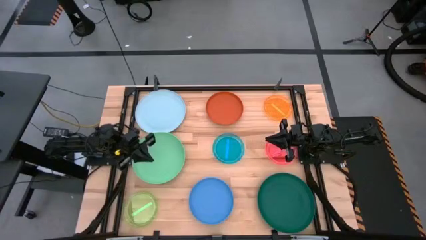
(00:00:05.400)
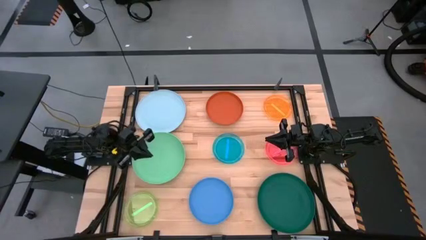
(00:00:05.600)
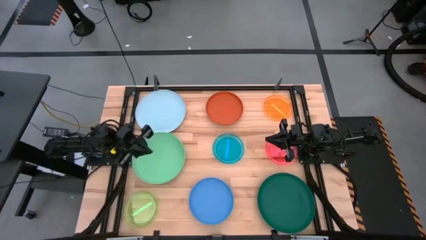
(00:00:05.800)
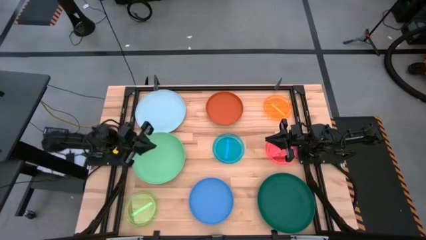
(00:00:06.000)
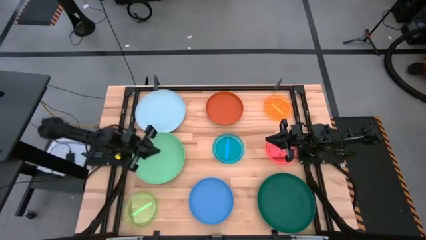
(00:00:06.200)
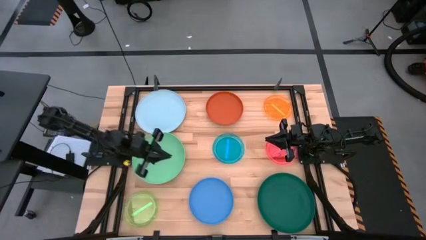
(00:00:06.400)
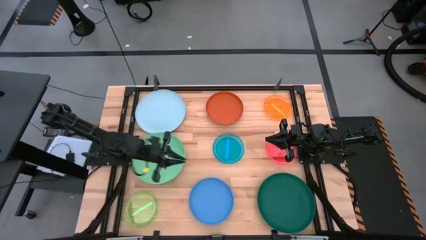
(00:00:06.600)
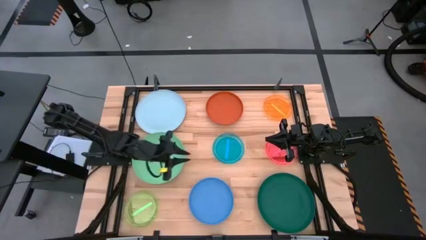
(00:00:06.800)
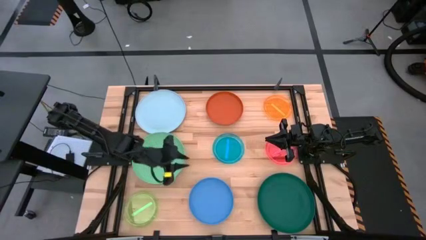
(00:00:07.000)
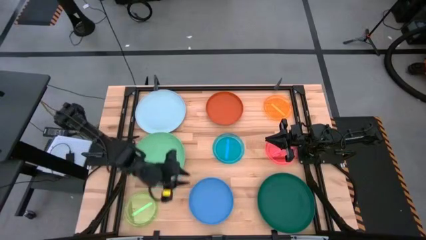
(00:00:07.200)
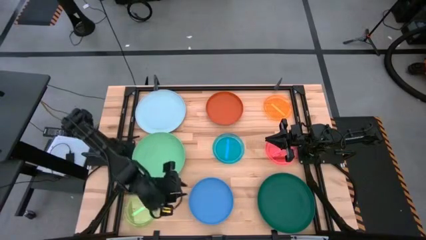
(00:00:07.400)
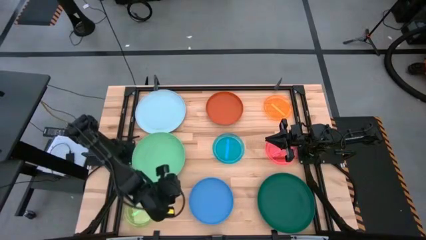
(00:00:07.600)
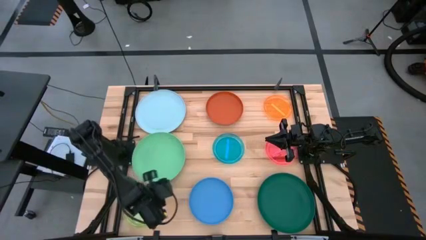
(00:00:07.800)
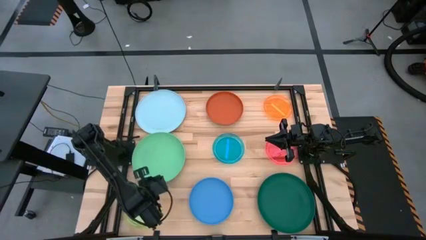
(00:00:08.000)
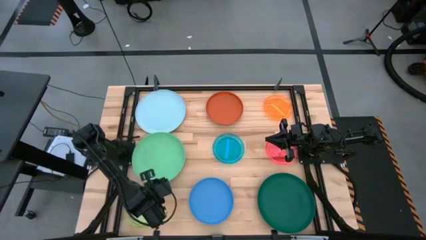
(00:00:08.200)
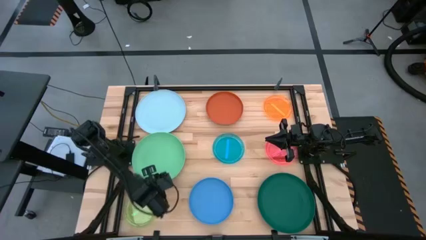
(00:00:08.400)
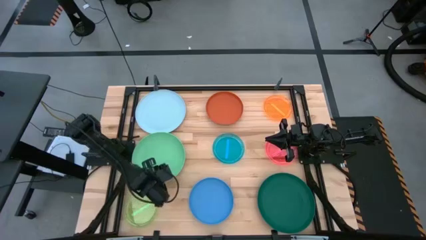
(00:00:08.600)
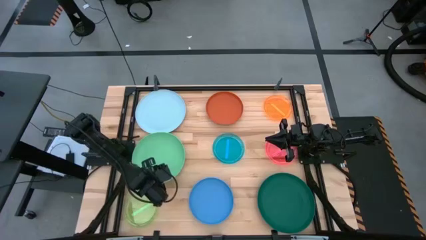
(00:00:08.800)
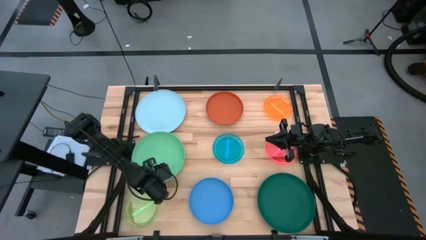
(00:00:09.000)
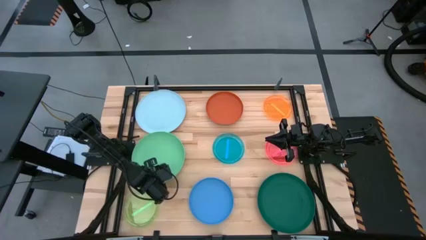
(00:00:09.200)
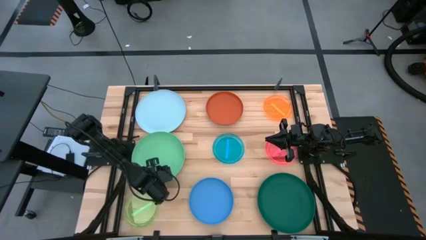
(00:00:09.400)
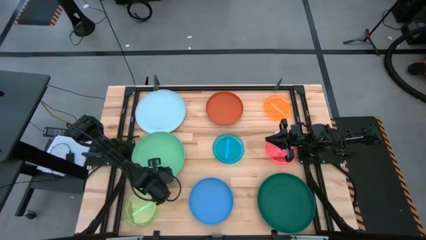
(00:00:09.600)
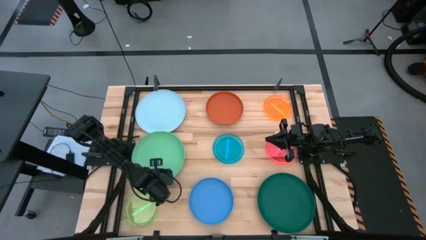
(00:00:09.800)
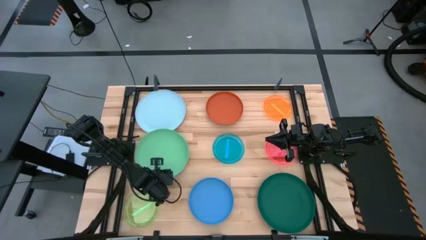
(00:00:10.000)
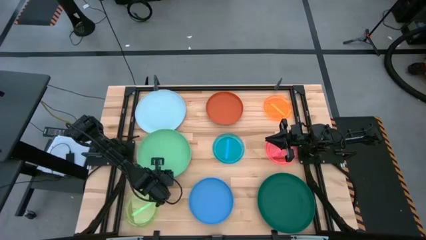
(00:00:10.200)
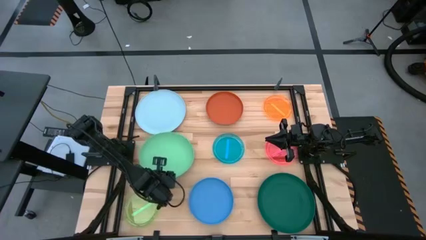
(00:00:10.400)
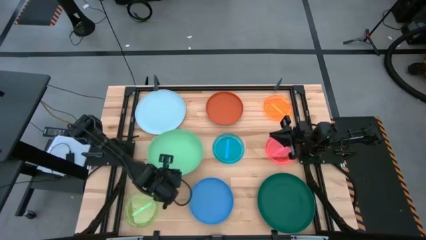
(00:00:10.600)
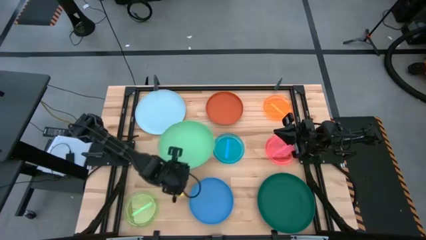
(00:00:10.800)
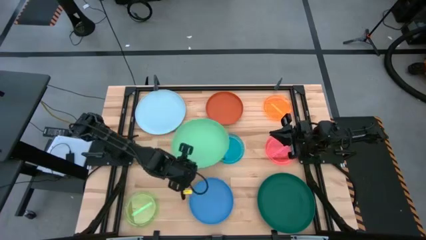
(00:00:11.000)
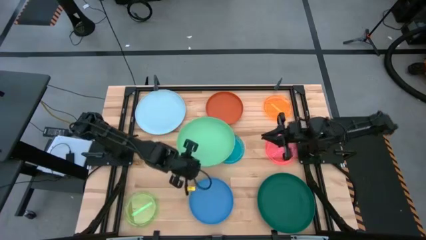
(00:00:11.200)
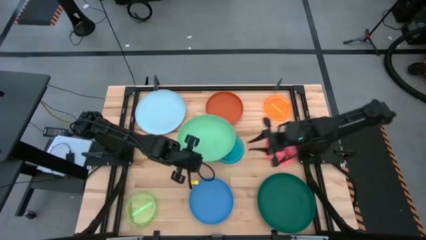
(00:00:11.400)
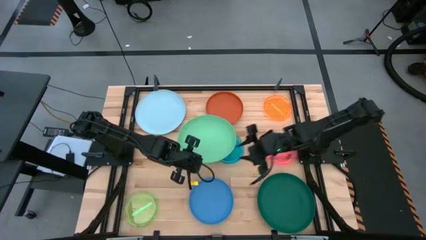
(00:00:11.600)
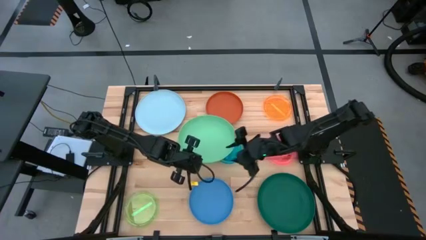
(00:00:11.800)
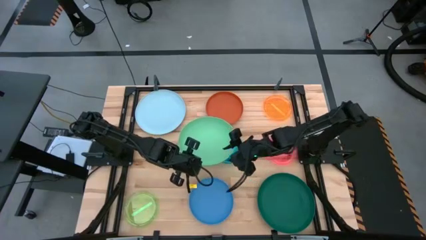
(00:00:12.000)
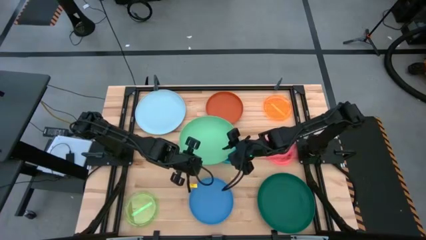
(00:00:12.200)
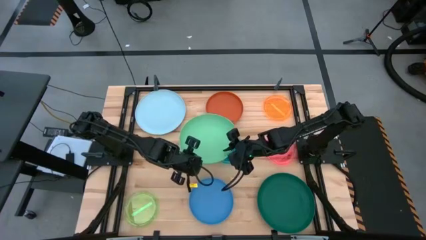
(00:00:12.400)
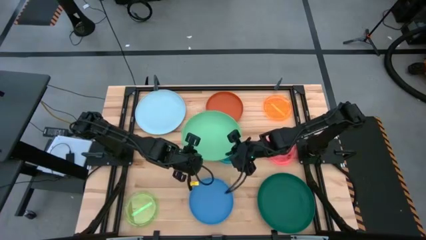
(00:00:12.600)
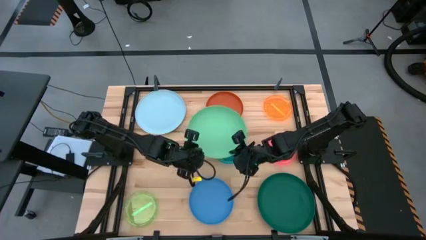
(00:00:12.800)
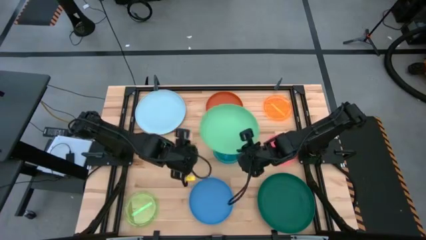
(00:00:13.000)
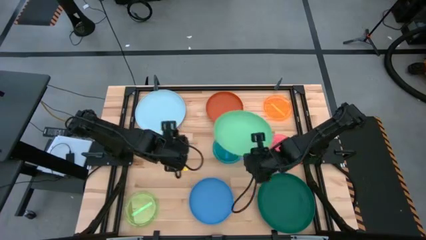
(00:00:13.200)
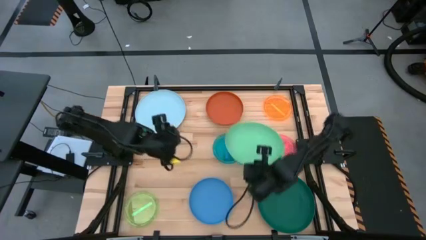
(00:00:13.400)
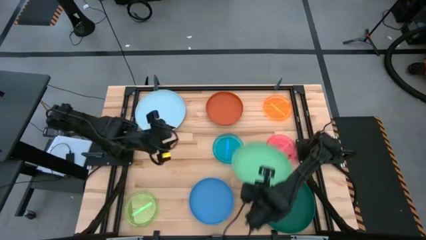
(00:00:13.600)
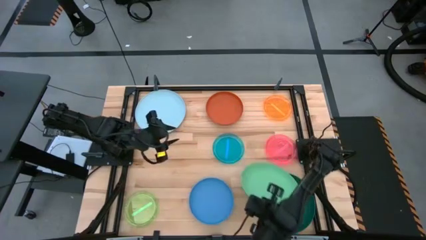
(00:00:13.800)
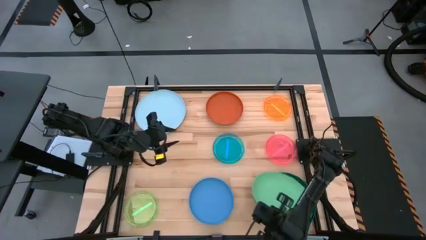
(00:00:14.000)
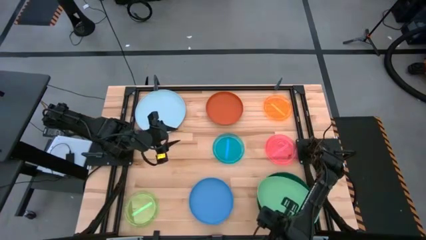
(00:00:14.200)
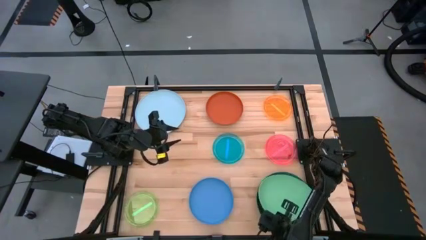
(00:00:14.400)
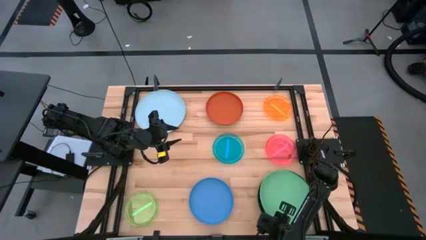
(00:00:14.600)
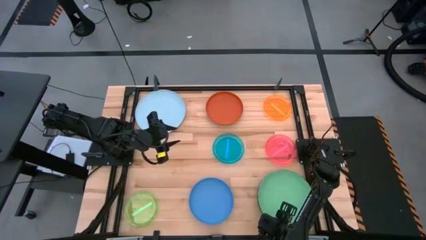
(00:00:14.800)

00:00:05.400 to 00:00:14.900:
Task: Stack plastic plates
Stack the green plate on top of the dark green plate

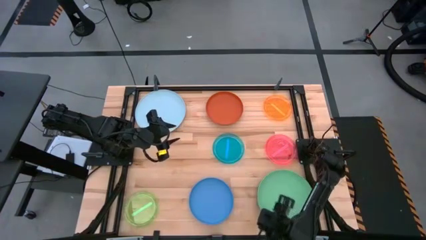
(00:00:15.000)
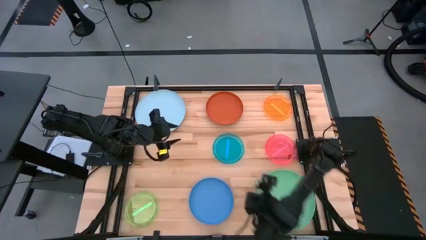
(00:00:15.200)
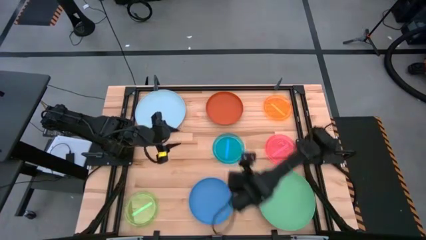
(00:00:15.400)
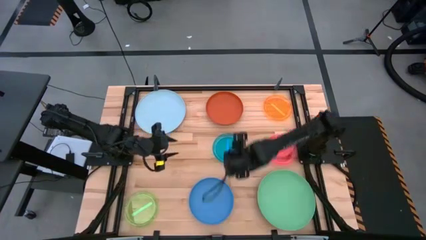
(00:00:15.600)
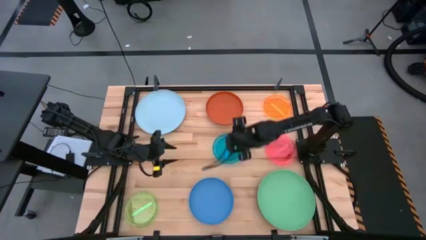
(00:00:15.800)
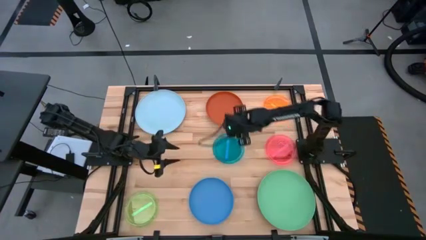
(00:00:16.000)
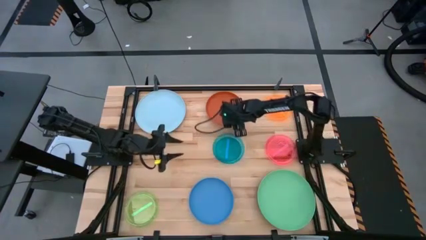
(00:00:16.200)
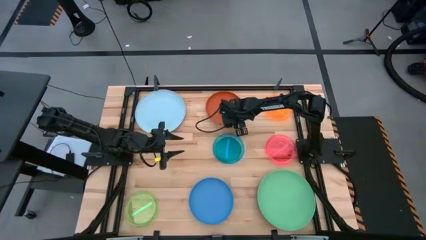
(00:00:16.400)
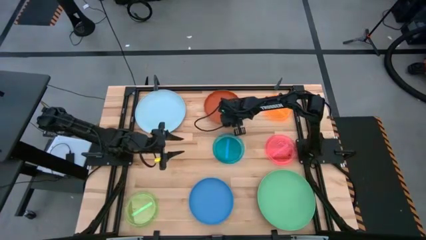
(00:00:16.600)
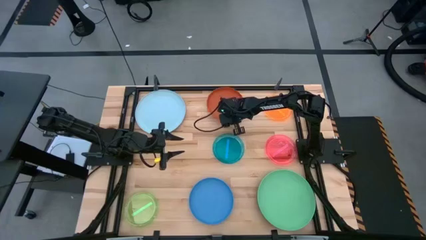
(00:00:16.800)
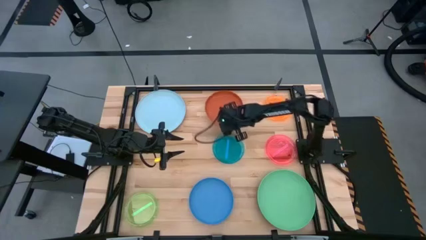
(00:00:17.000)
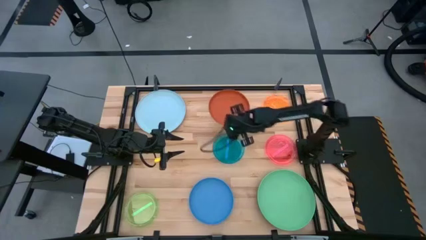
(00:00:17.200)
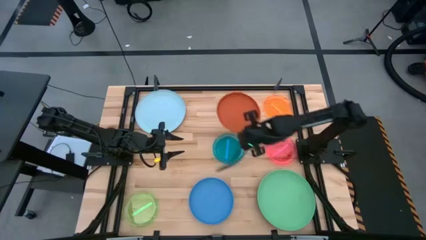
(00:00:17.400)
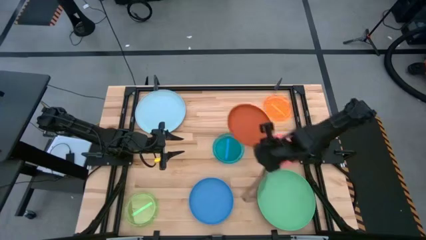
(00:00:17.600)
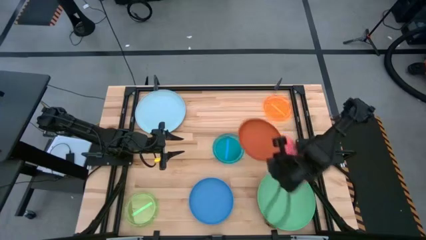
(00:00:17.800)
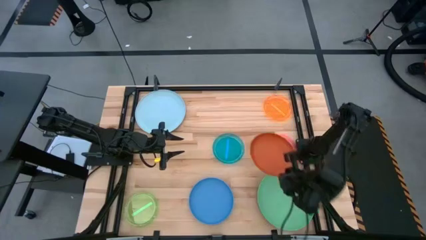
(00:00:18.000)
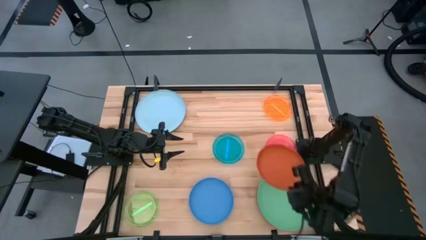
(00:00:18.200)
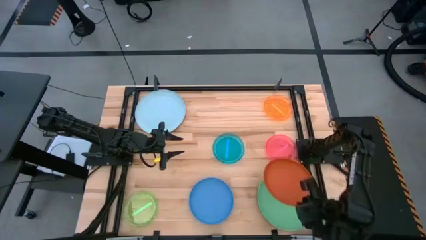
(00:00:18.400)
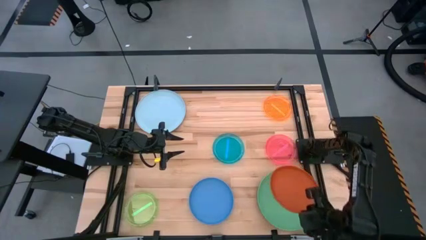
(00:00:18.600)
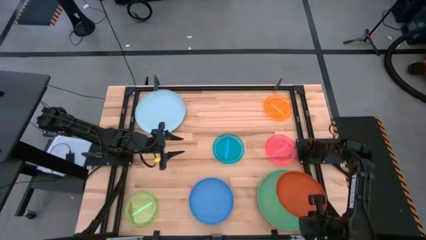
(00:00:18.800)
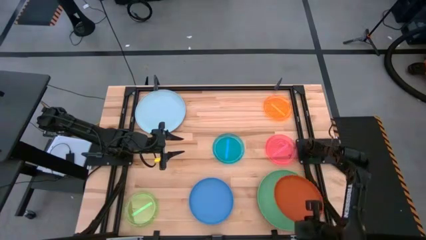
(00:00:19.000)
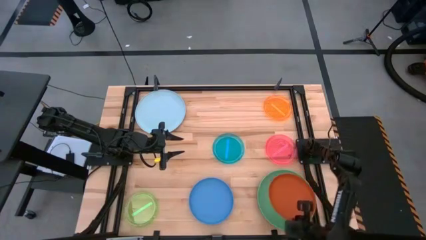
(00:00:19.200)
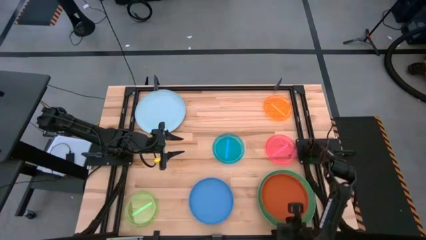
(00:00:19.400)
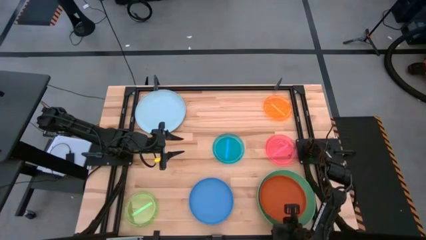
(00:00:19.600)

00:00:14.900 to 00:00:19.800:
Stack the orange plate on top of the green plate

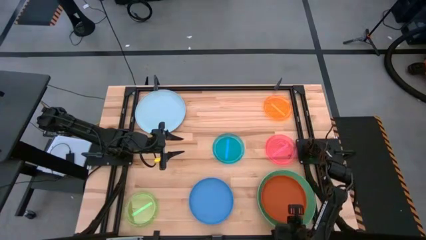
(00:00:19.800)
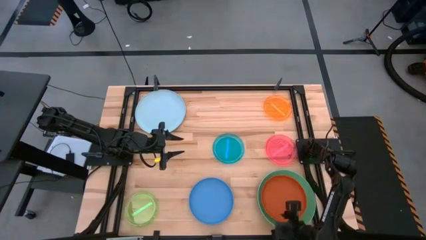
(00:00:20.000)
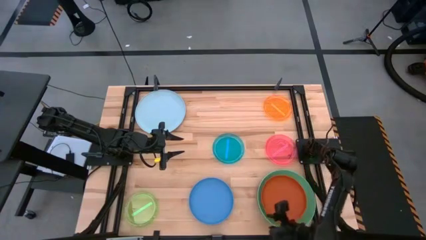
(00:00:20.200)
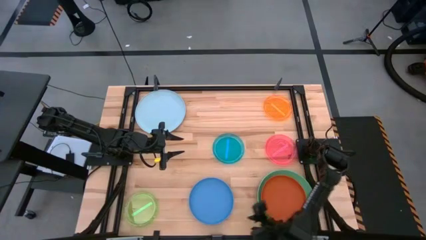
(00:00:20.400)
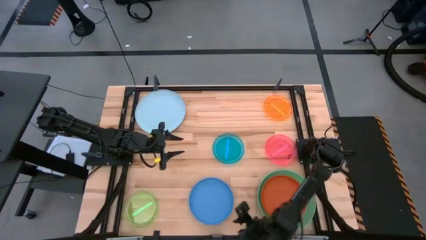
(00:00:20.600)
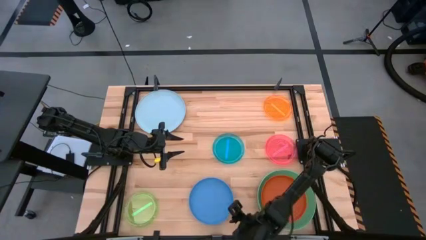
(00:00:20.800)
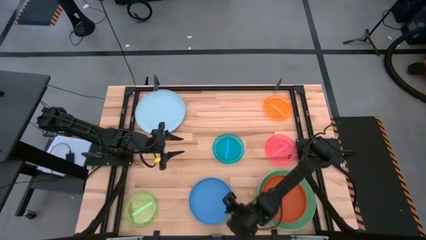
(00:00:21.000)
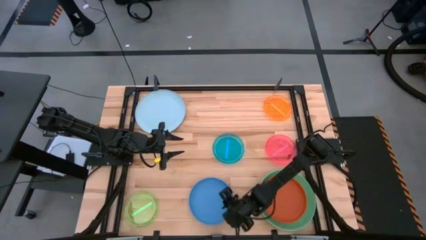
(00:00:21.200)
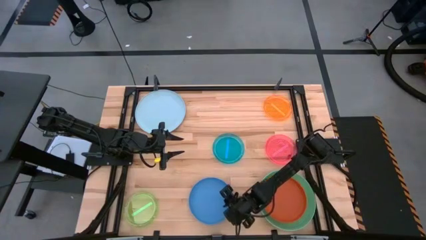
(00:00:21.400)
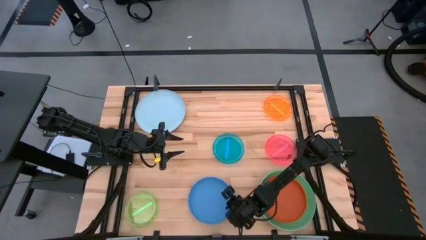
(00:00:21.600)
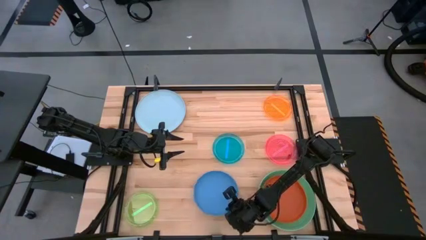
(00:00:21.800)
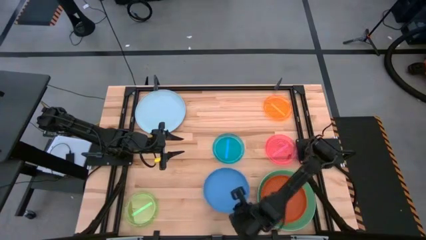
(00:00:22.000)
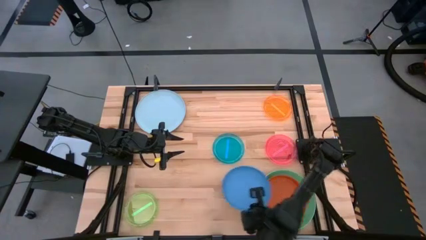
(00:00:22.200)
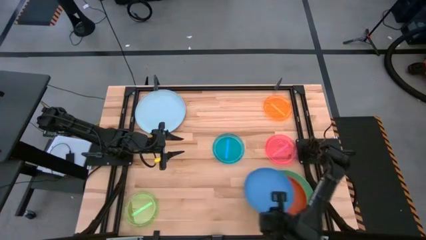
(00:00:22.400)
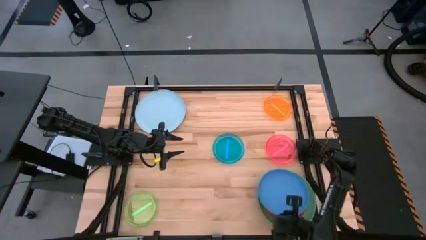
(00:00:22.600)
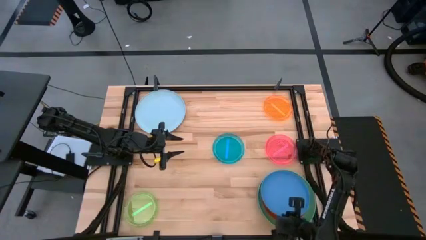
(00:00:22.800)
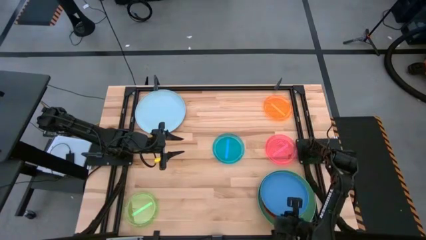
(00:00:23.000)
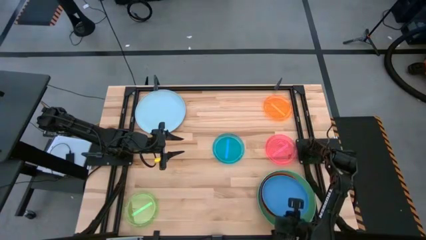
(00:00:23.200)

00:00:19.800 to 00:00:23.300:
Stack the dark blue plate on top of the orange plate
